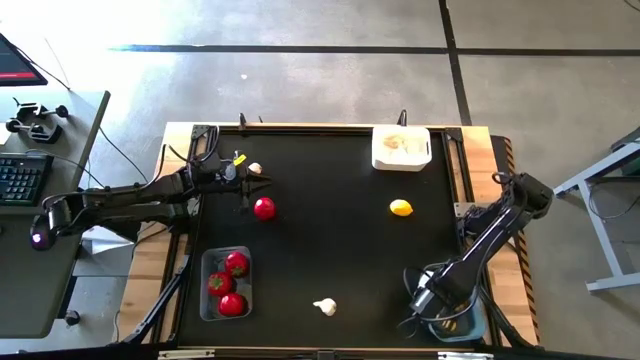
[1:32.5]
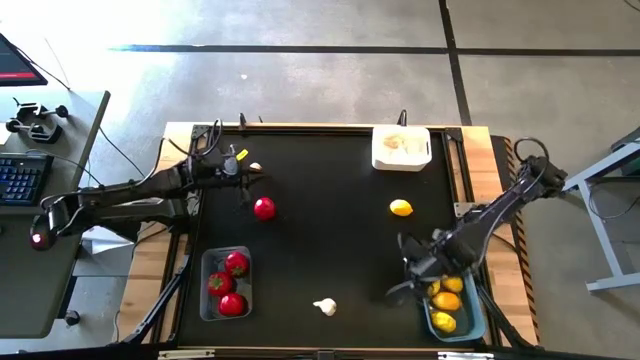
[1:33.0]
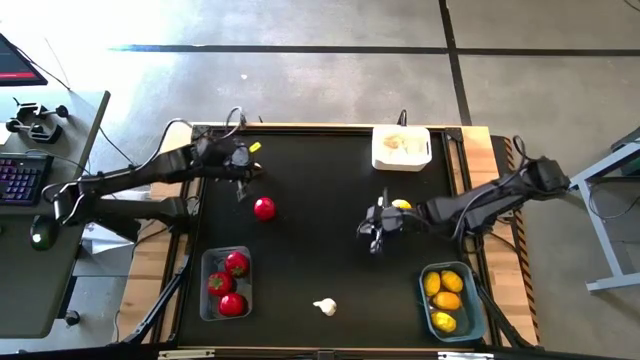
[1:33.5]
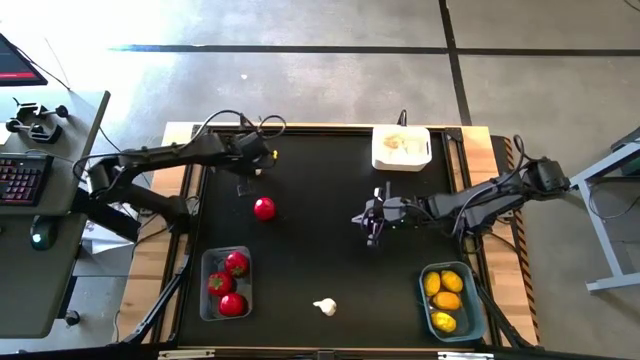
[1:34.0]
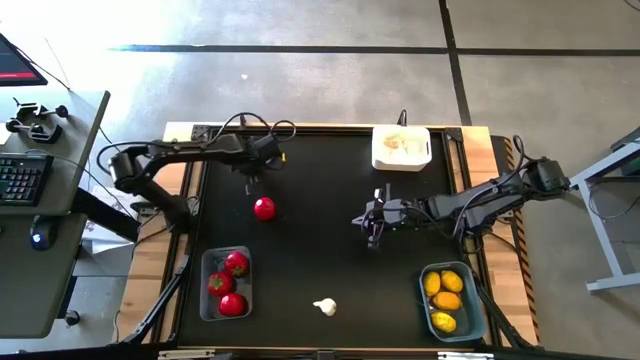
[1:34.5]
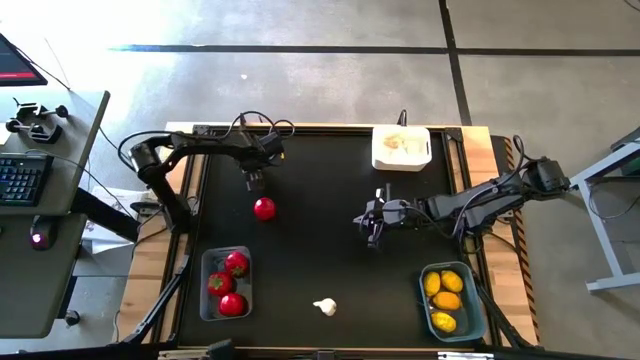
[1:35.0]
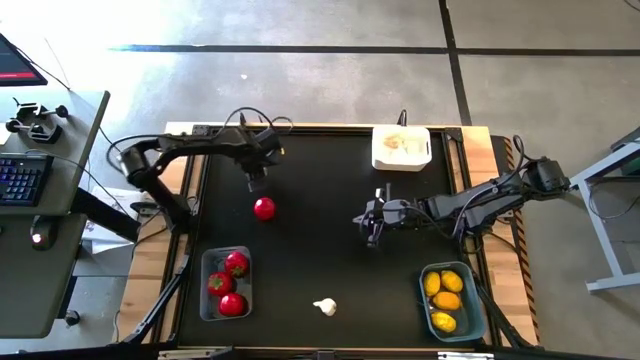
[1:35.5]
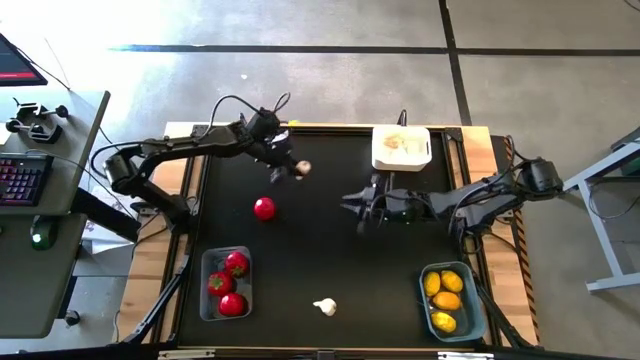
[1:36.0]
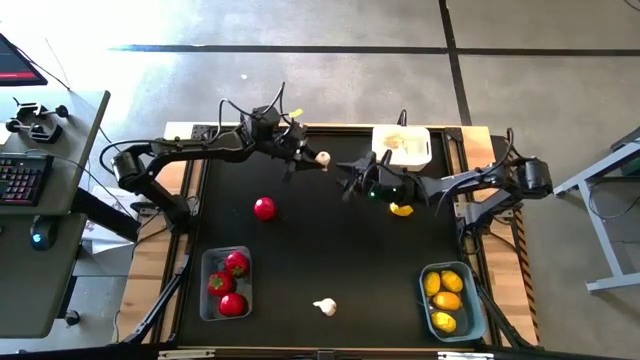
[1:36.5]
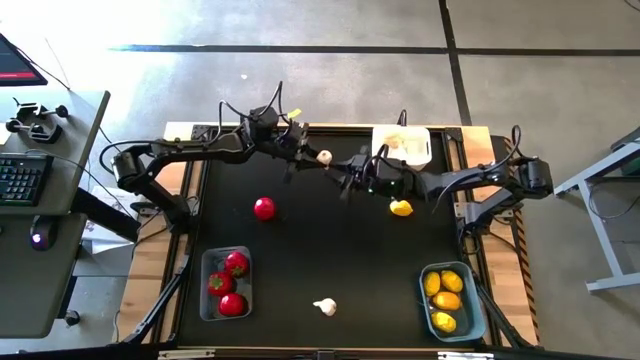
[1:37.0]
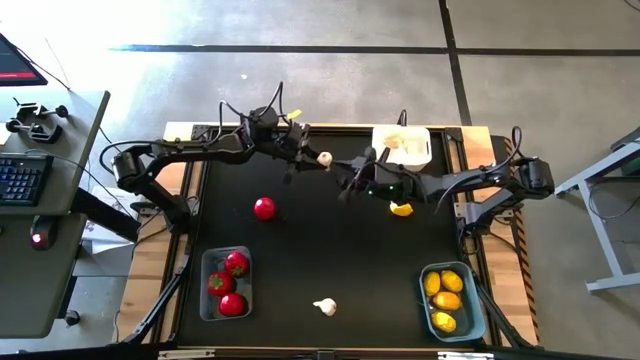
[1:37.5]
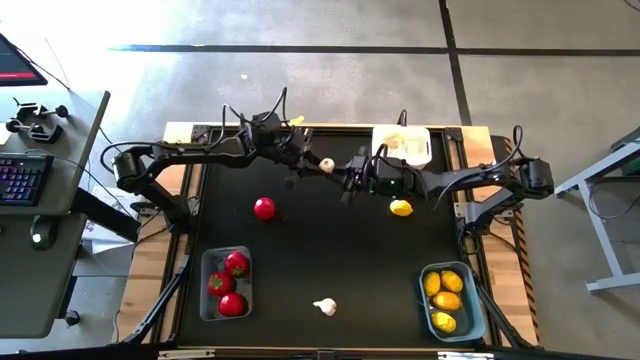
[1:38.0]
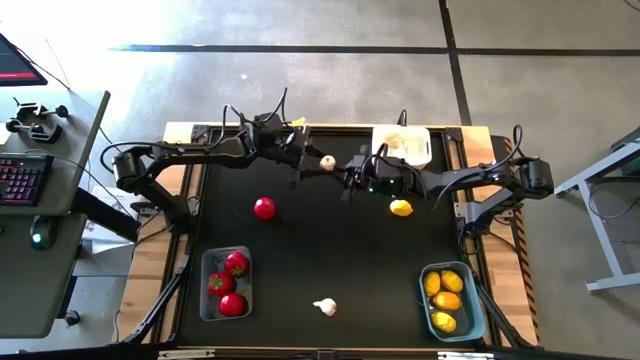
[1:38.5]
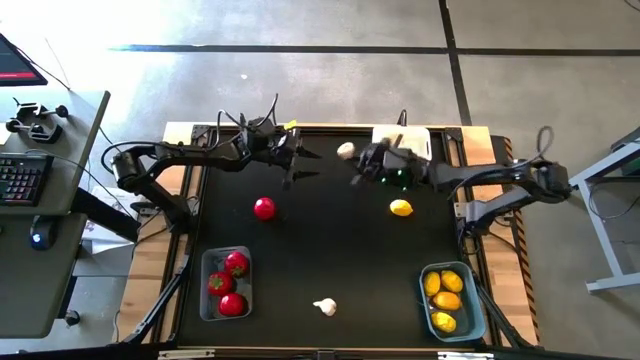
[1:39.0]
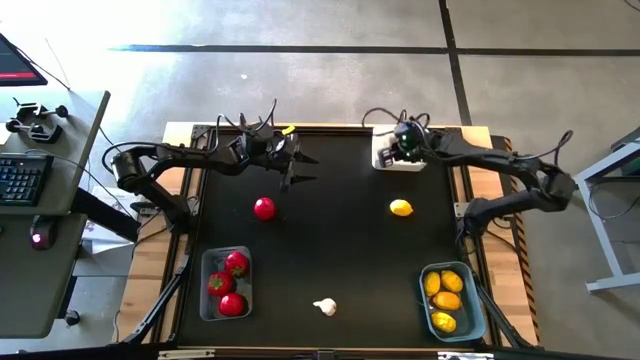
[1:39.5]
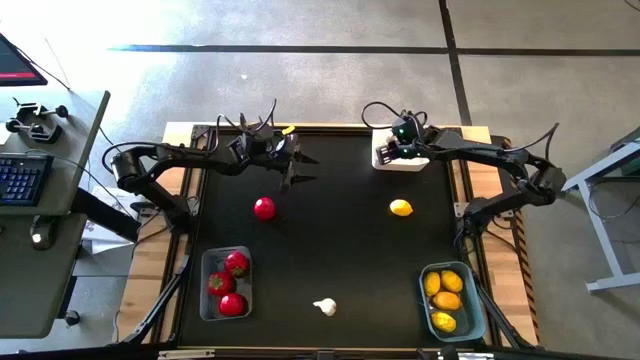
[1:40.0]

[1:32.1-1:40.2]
Task: Sort produce into baskets
Put the garlic into the white bin

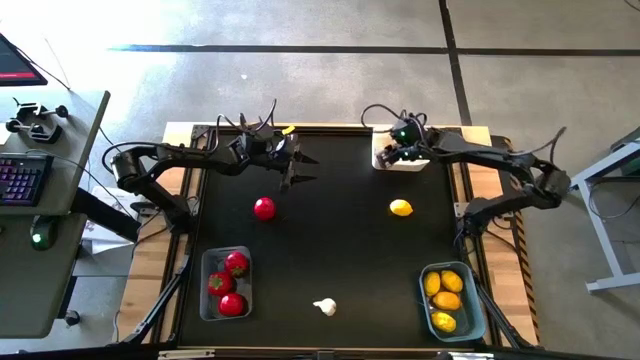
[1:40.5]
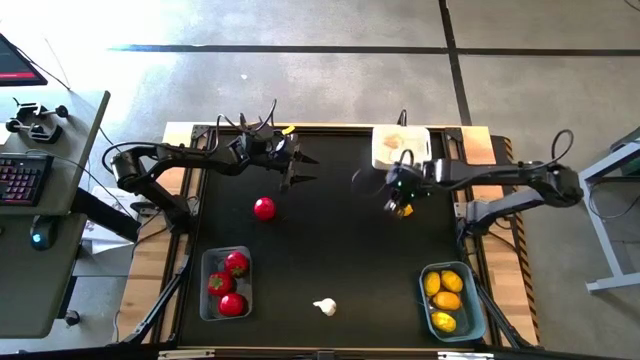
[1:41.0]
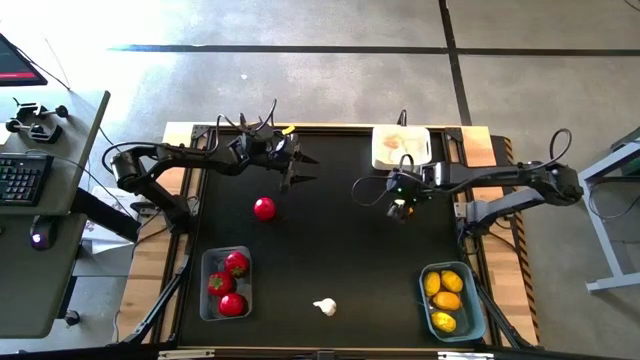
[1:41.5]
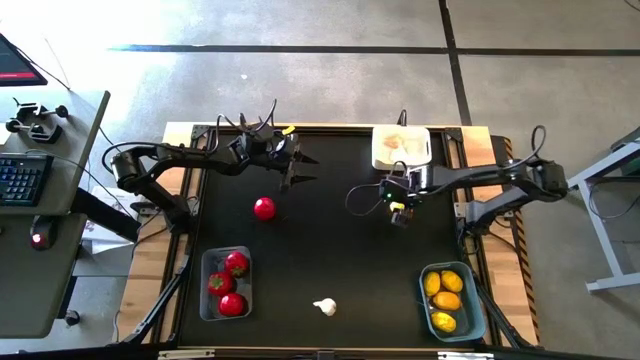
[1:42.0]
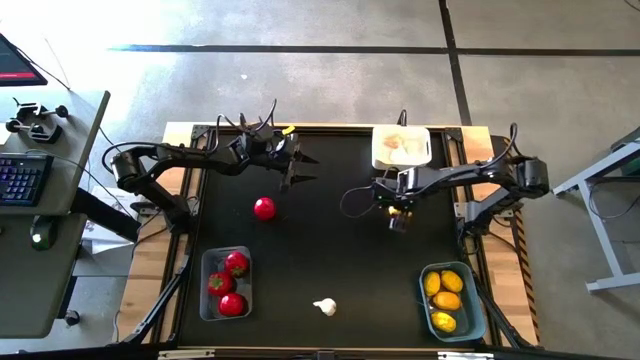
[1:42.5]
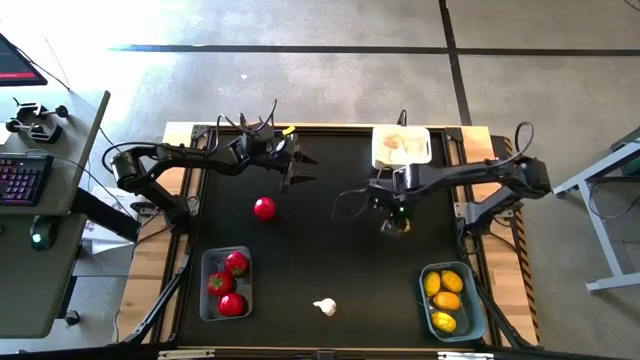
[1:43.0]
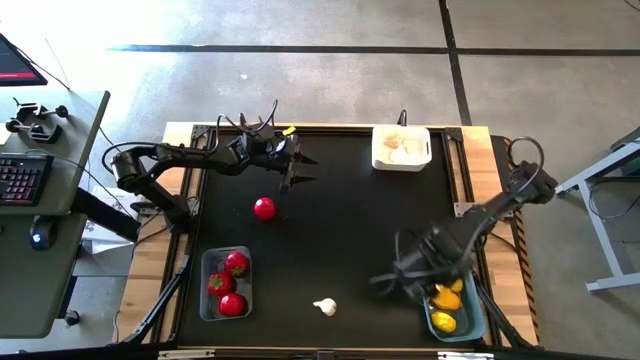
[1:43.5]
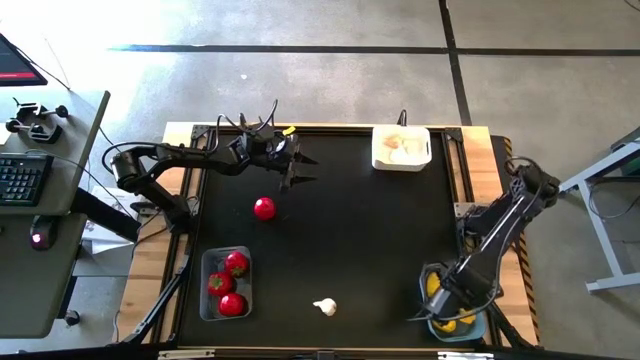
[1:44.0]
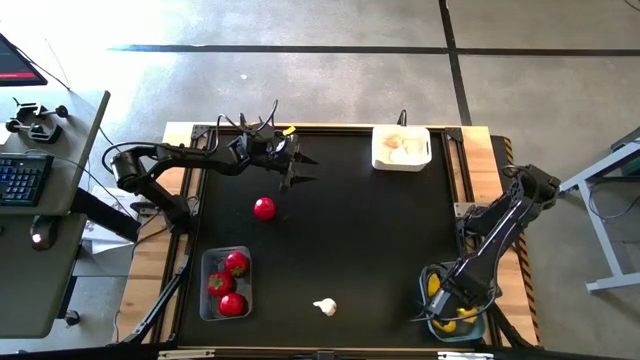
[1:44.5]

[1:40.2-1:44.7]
Put the lemon into the blue bin

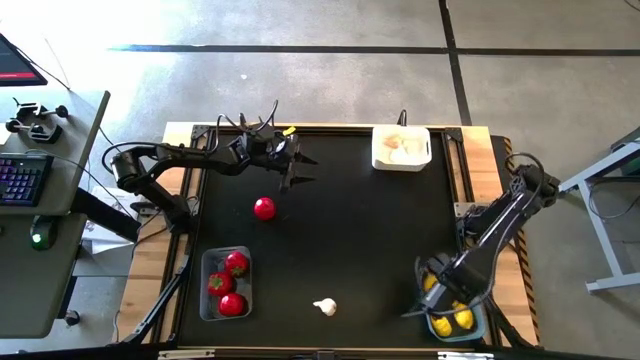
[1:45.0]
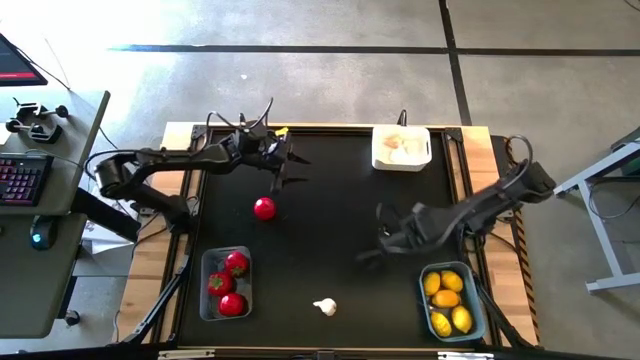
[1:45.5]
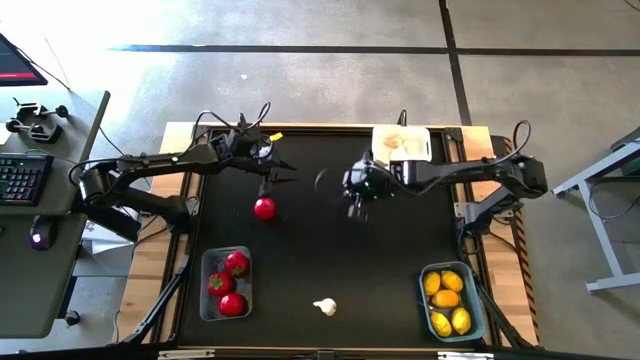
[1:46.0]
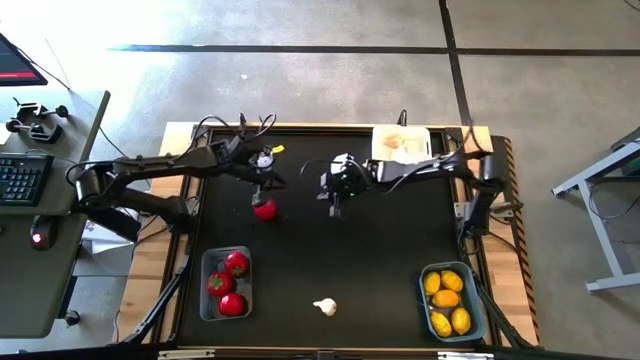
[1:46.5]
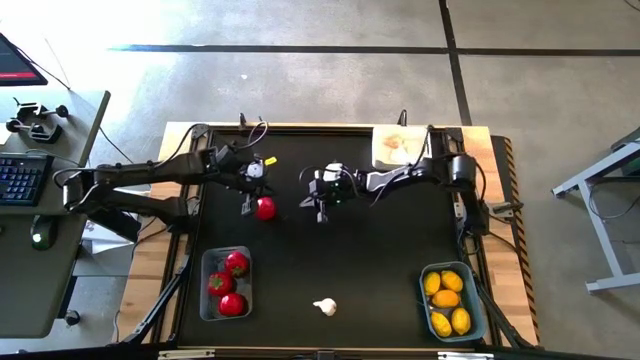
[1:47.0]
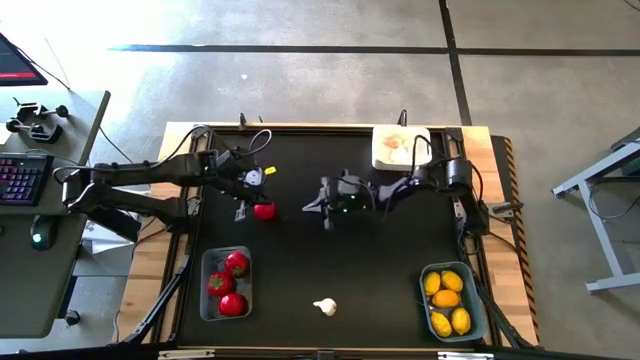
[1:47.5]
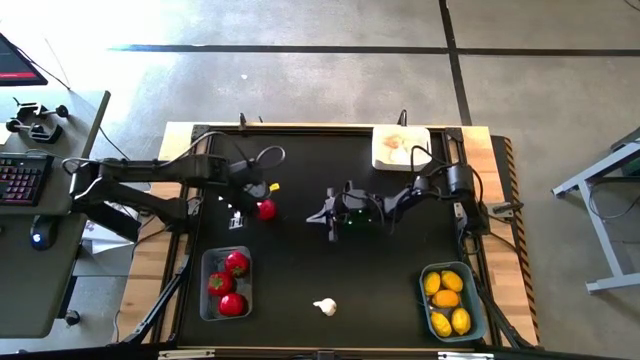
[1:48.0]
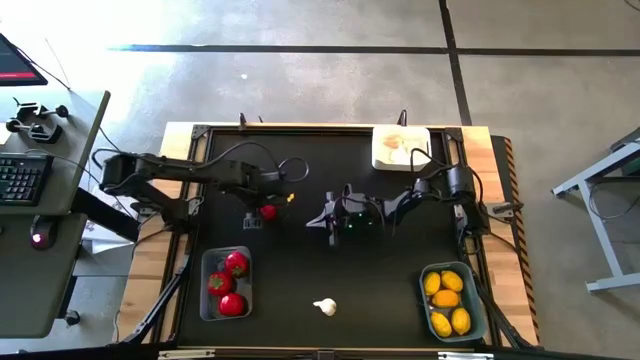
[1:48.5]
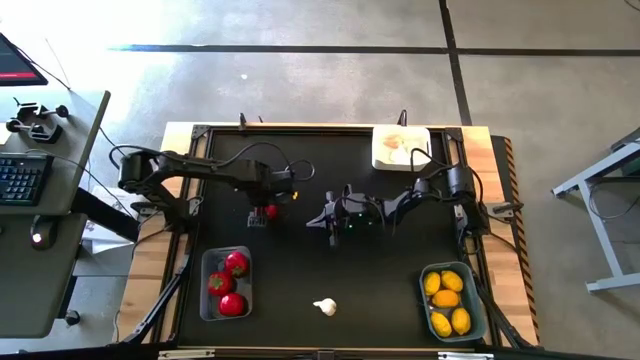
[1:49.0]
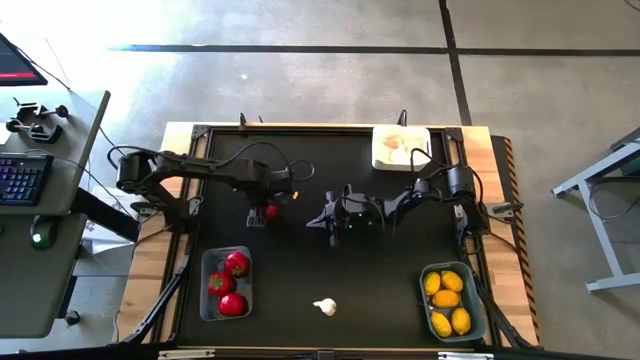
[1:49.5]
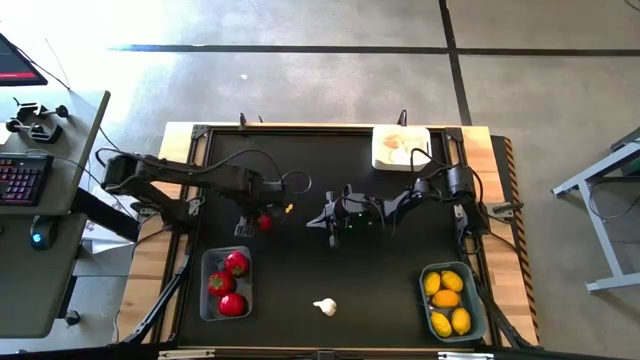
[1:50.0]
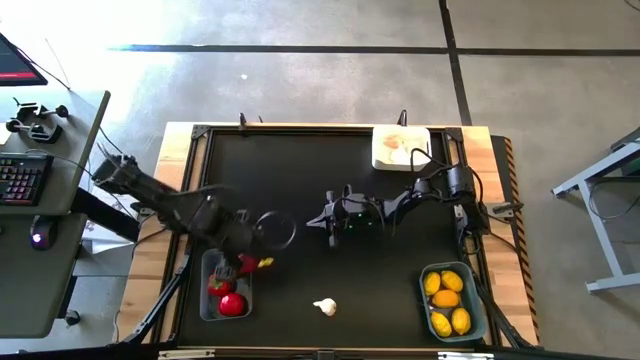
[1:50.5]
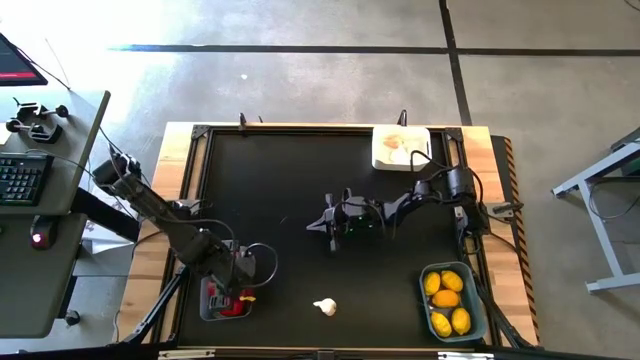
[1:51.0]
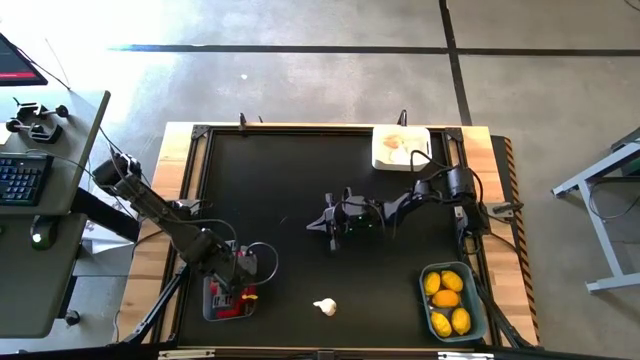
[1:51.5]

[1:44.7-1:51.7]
Put the tomato into the transparent bin

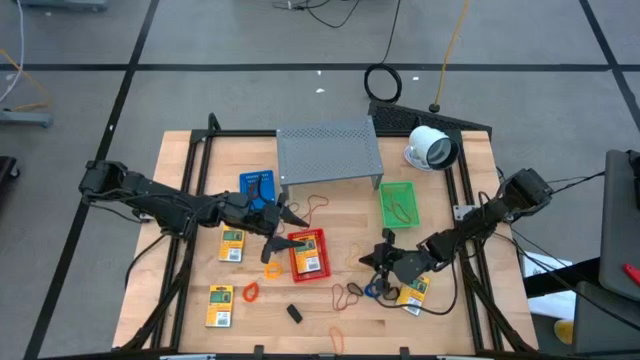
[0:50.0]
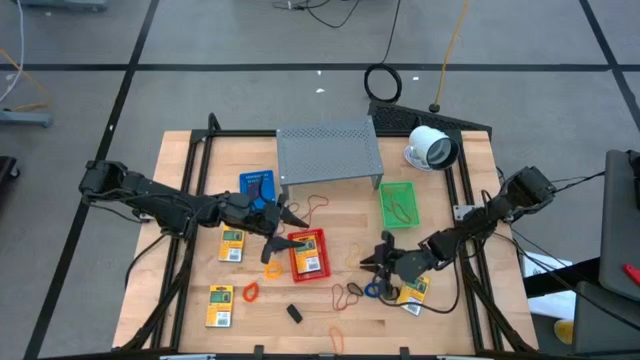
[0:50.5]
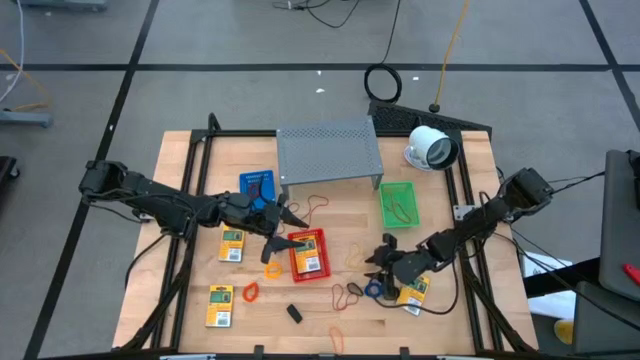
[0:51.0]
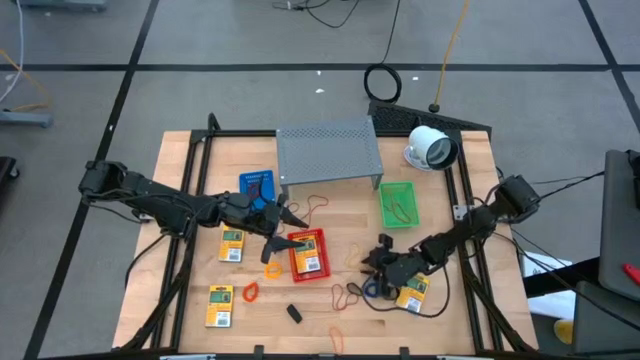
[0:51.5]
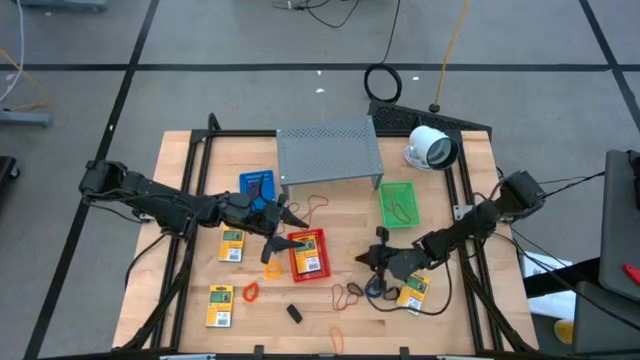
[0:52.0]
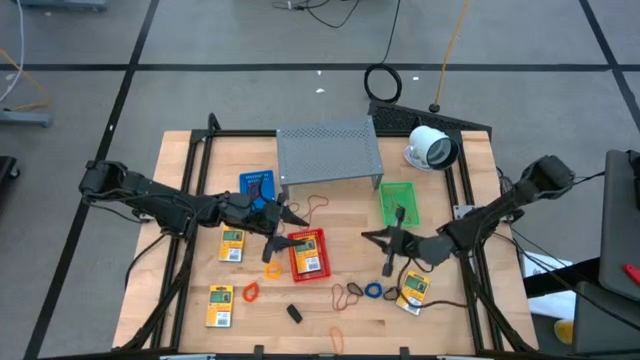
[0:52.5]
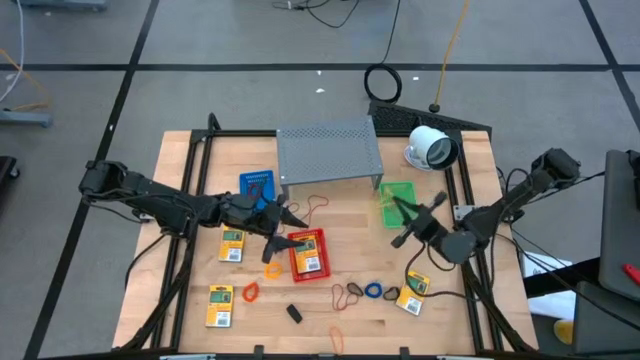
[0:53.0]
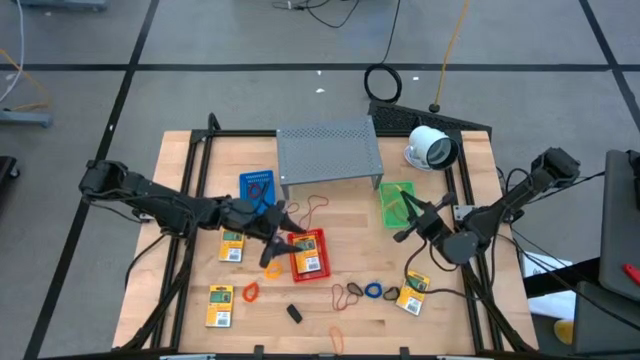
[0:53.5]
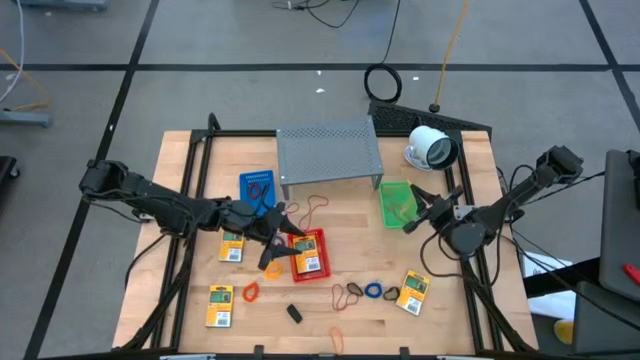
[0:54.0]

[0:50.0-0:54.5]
Task: Pick & Place Office Desk Supplies
Put the yellow rubber band into the green bin
